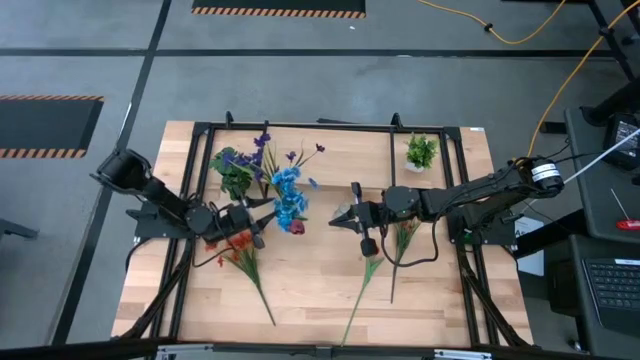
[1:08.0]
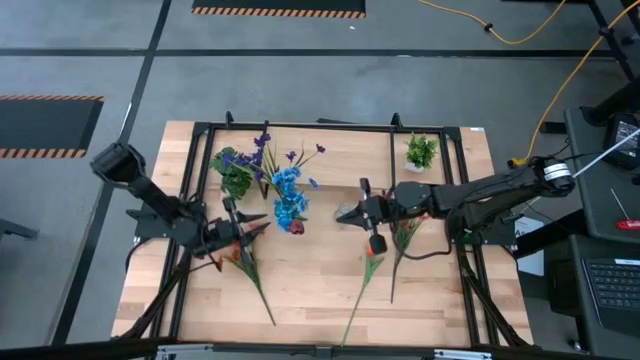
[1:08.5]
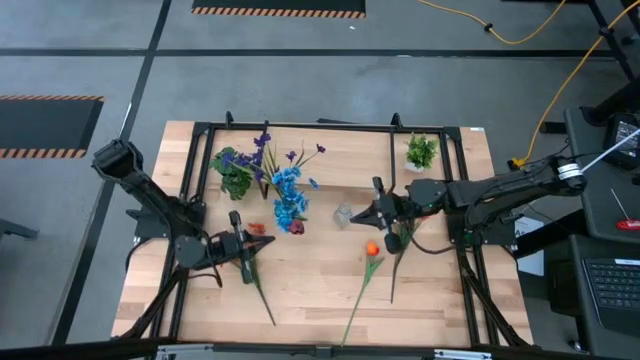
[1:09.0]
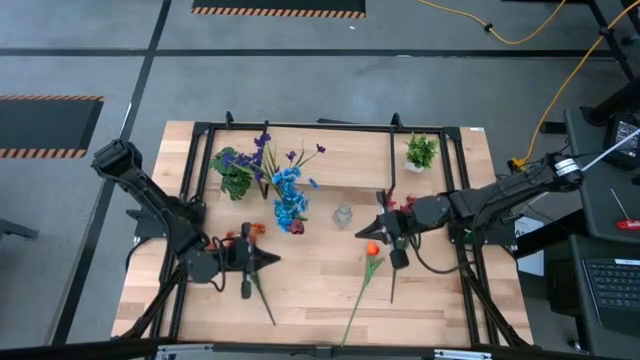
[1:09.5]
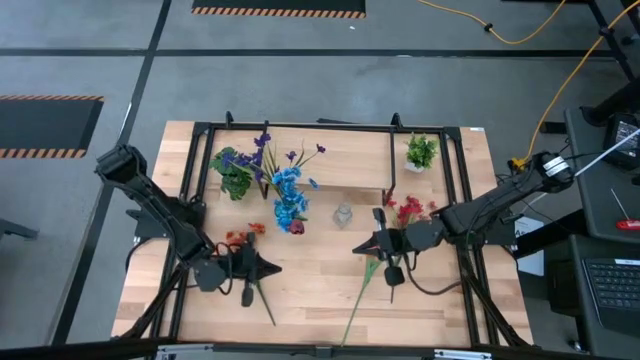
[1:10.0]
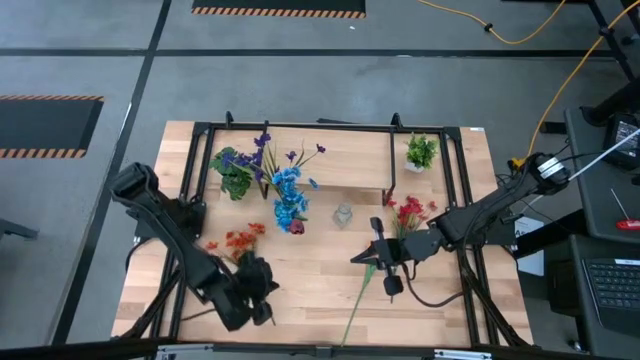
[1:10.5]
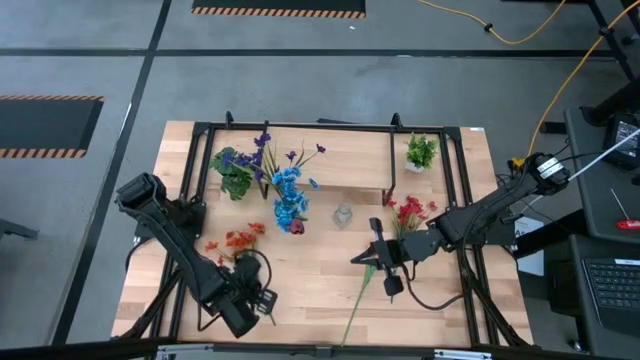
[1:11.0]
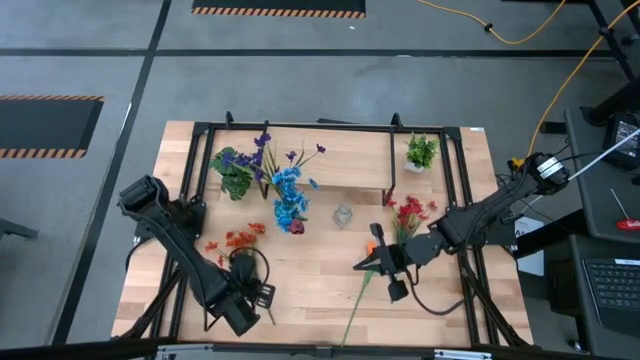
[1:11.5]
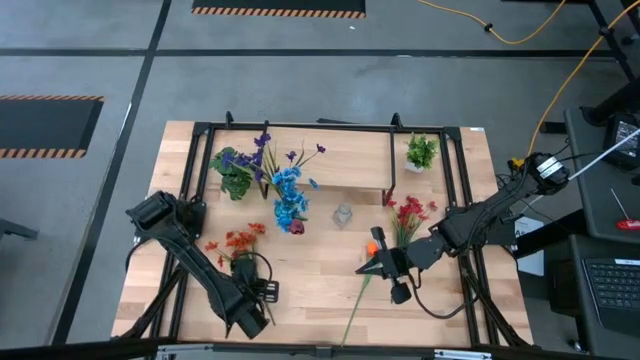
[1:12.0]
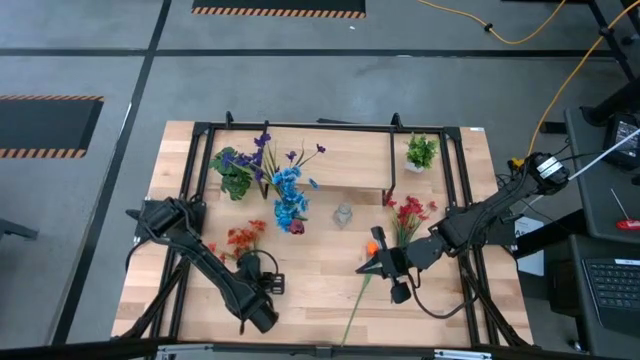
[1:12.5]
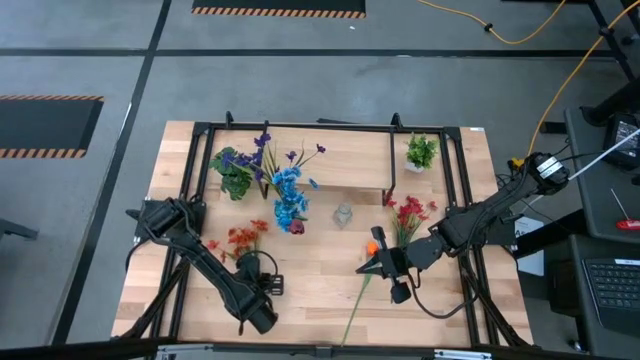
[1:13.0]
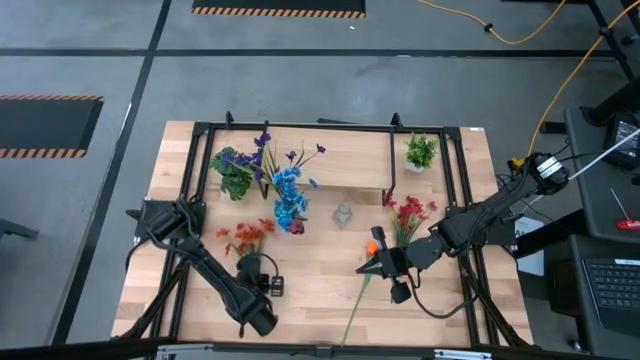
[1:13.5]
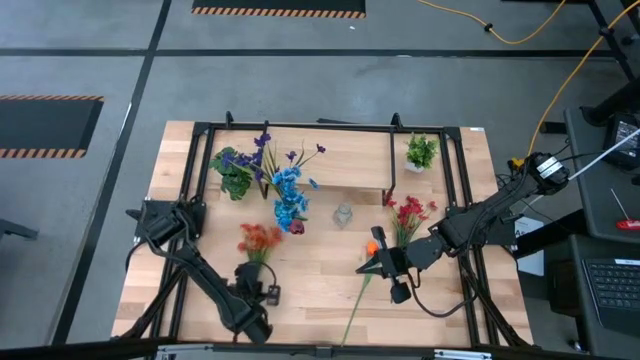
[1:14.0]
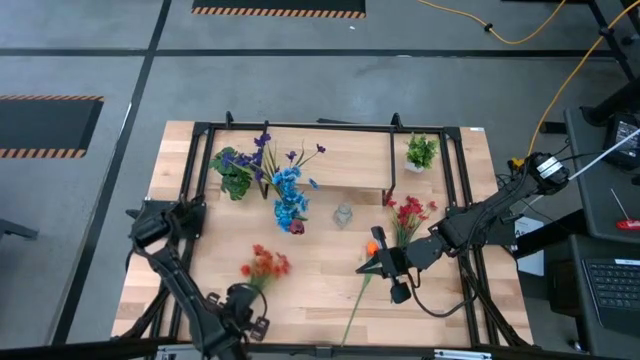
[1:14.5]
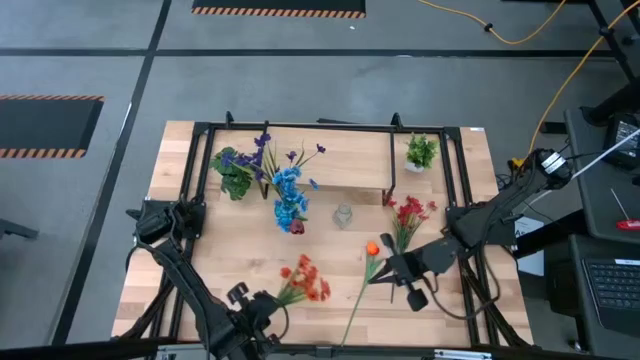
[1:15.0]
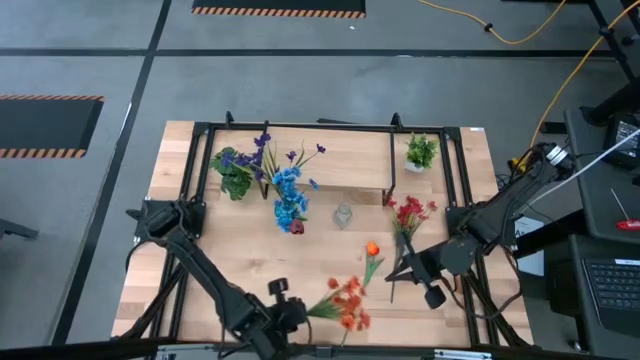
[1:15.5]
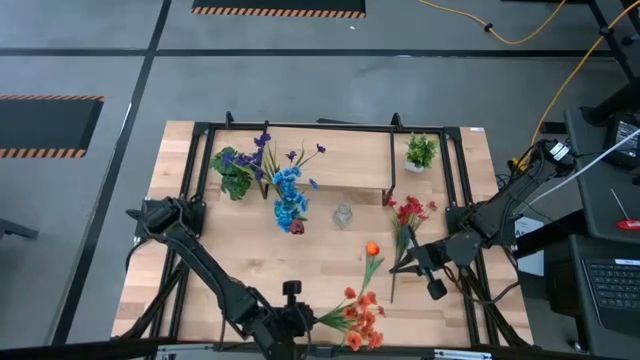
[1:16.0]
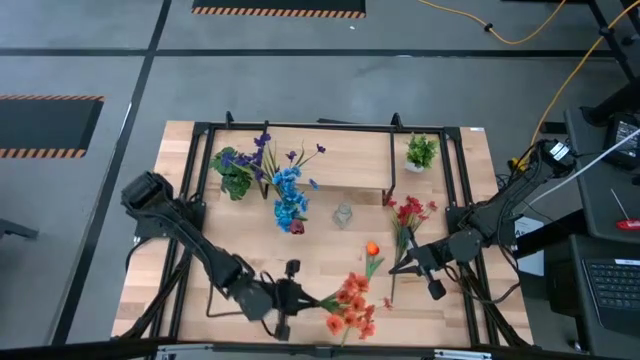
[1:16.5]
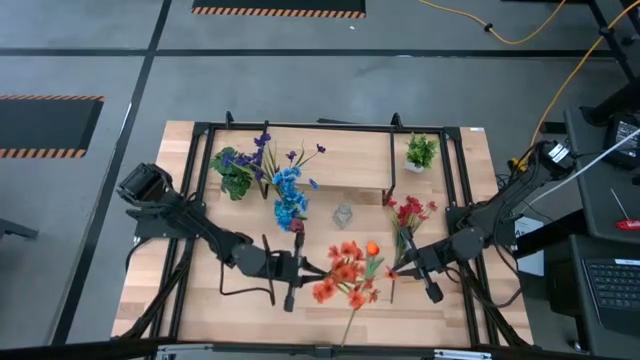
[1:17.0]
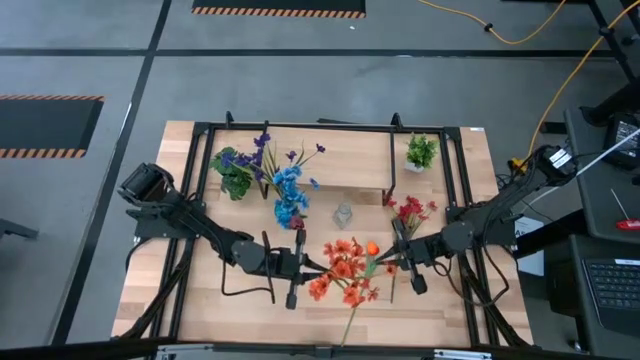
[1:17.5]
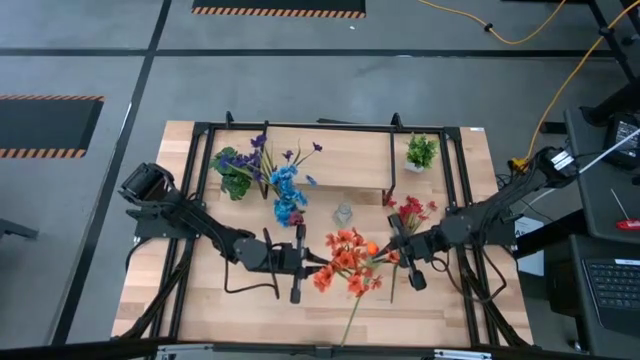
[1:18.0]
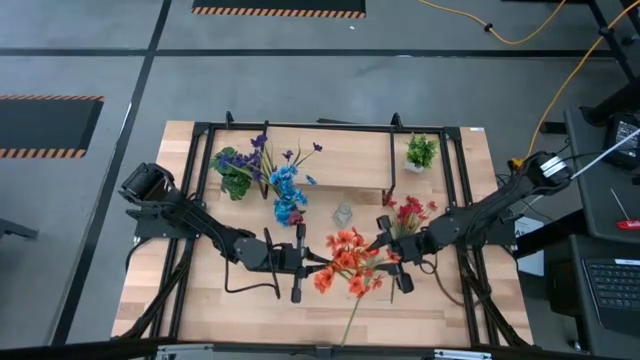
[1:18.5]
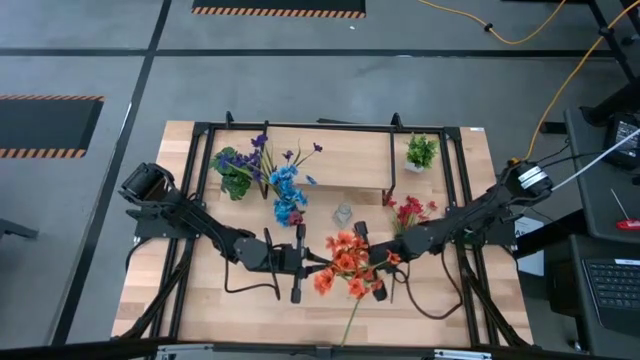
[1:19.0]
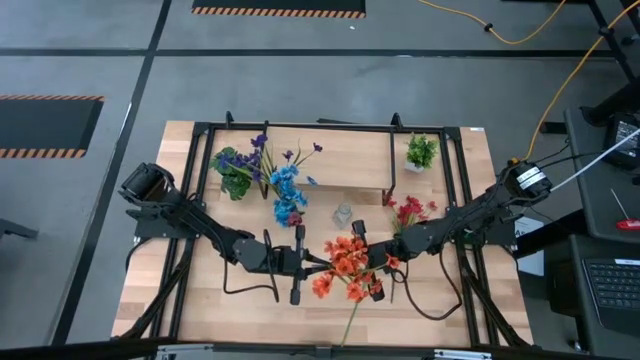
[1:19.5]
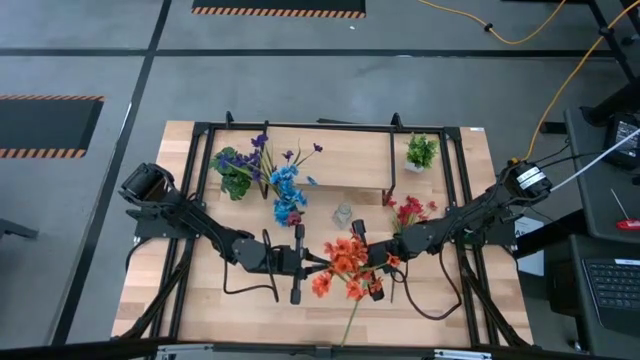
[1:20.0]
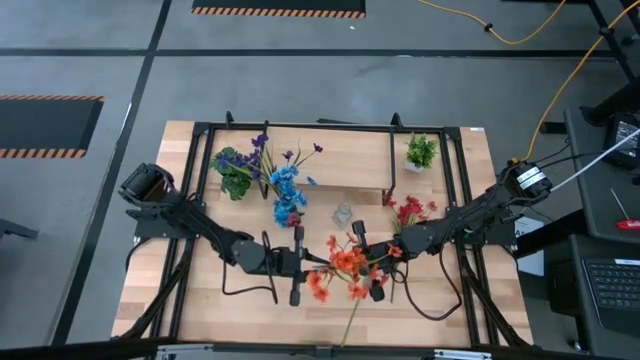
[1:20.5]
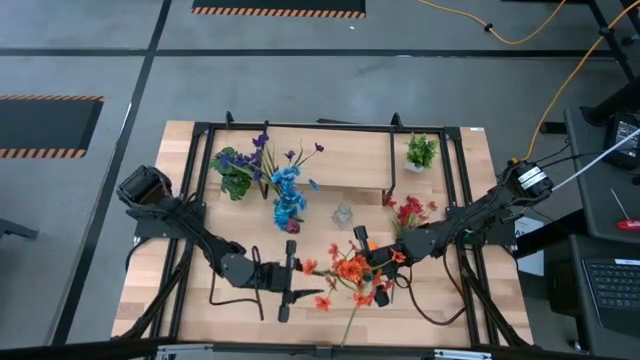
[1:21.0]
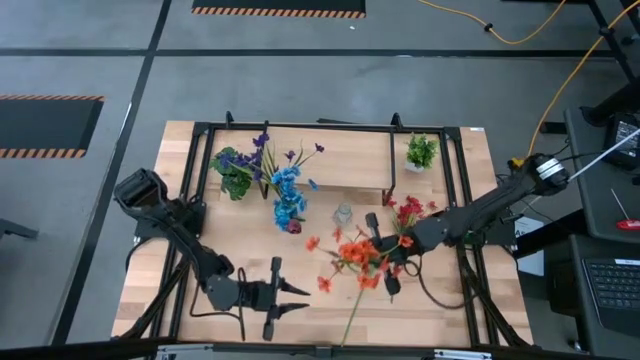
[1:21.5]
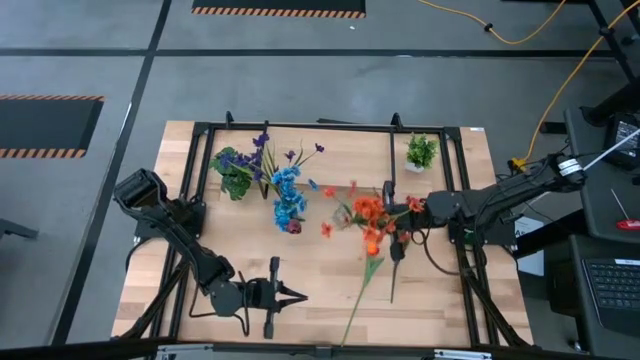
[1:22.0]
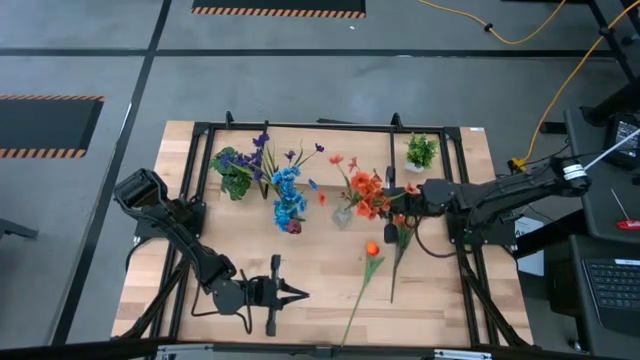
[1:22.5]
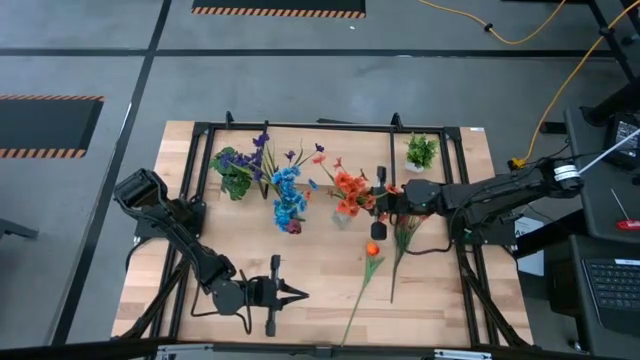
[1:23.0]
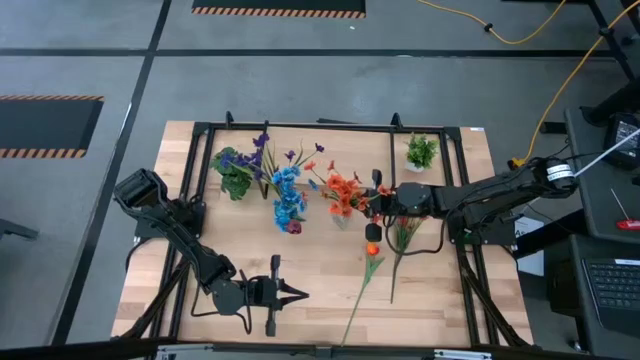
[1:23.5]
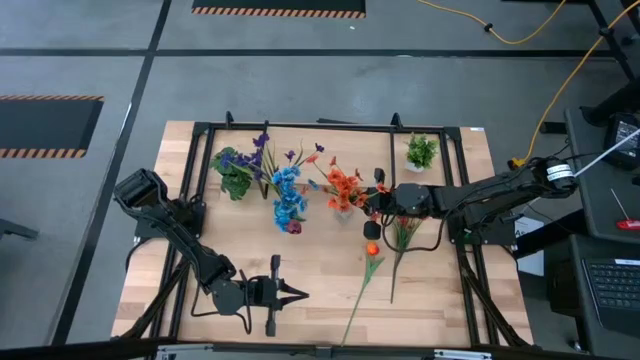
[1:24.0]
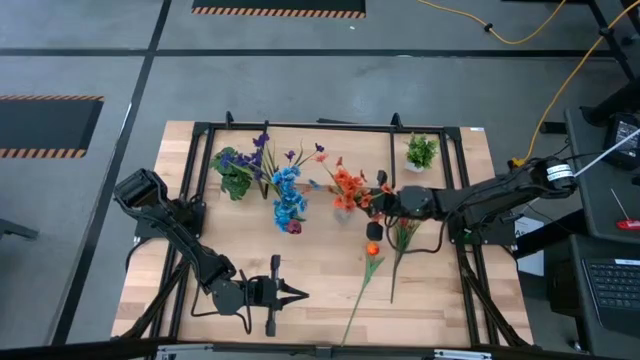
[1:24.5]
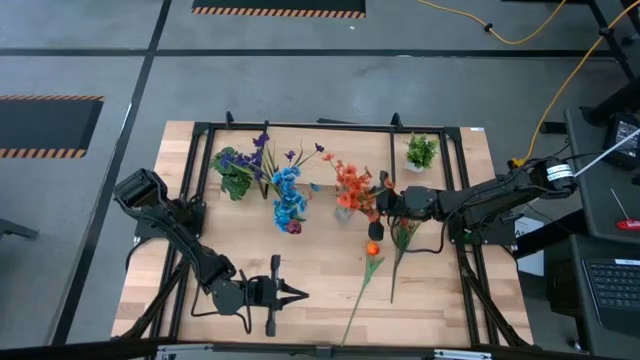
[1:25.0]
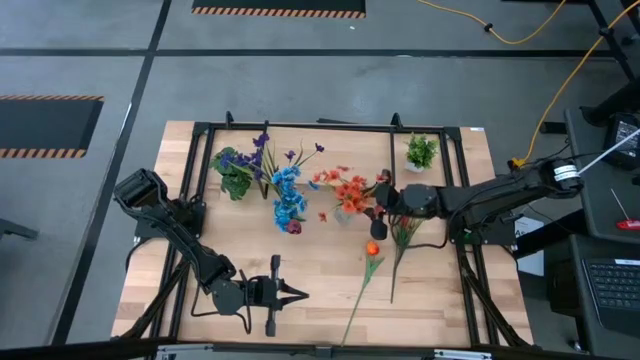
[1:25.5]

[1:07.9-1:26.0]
Task: Pick and place flowers into a vace then onto a shelf
Put the red orange flowers into the transparent vase

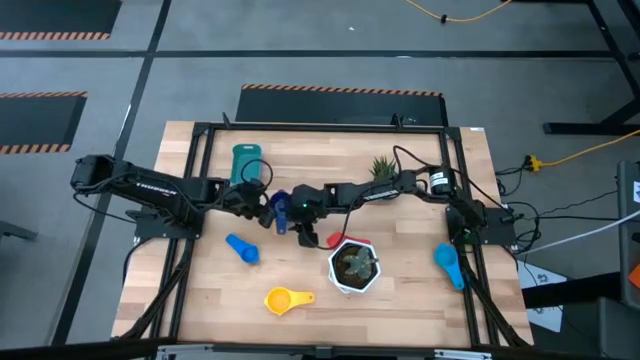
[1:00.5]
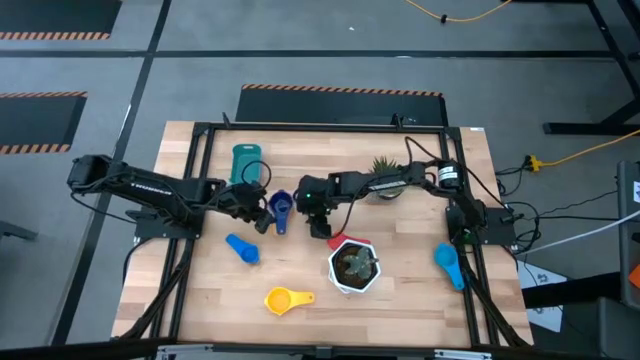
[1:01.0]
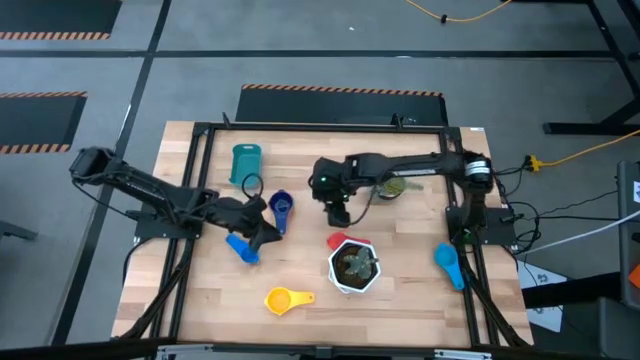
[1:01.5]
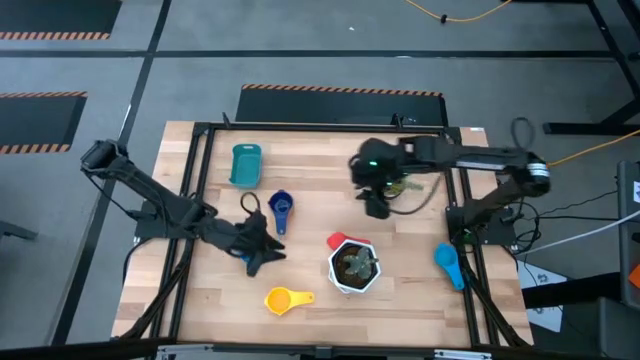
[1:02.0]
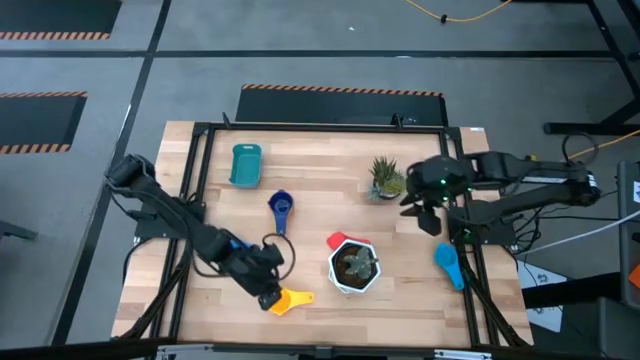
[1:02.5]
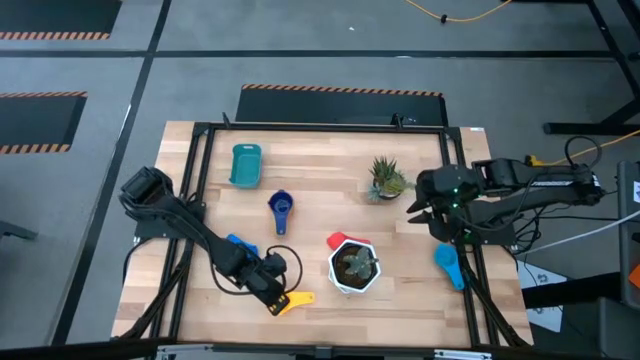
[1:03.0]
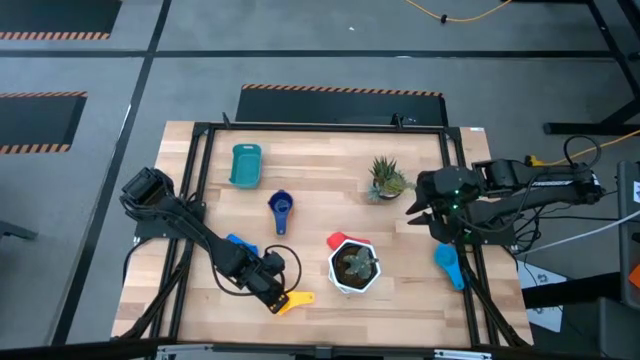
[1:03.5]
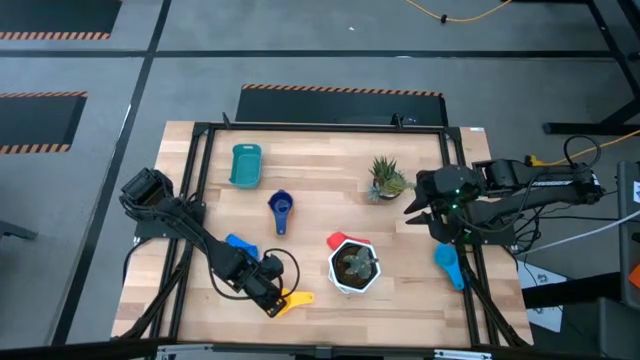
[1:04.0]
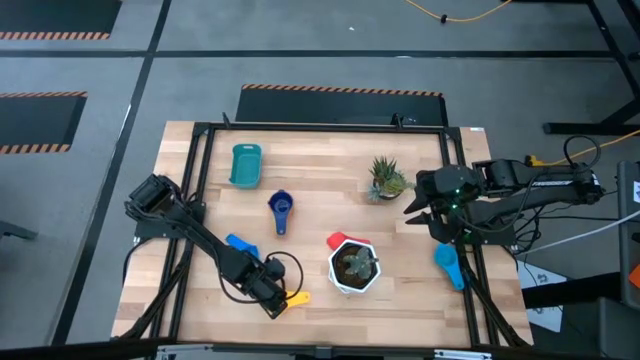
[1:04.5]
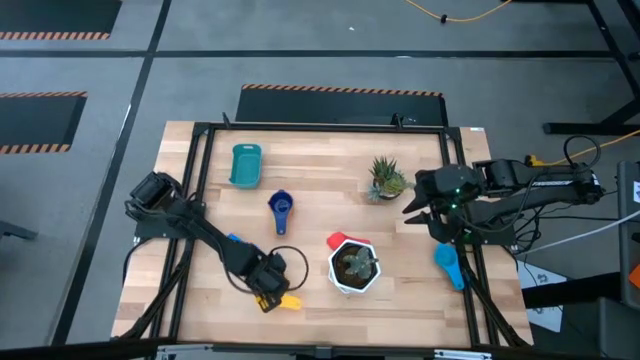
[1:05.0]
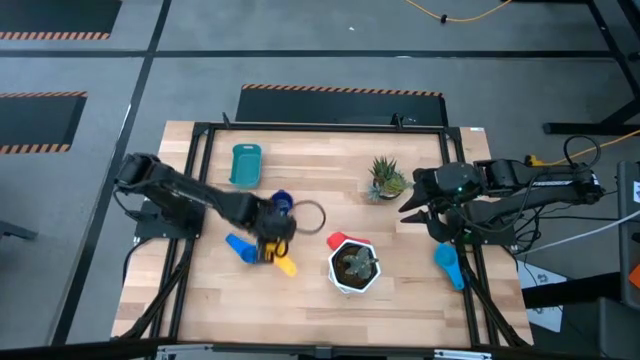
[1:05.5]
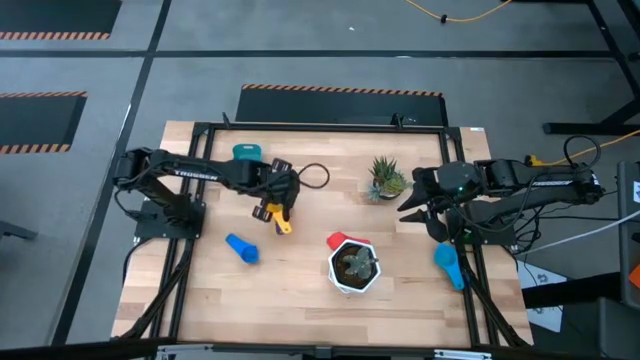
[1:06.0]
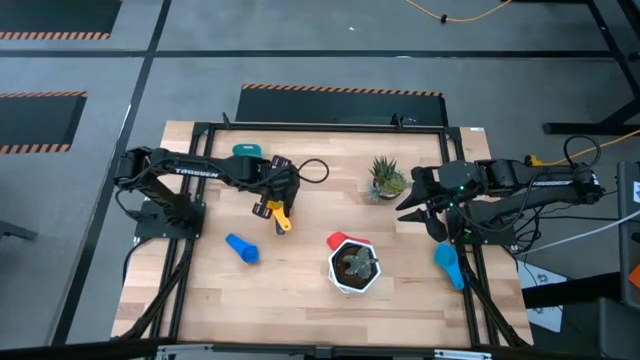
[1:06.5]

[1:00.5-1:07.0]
Task: Nest measuring cups in basket
Stack the yellow measuring cup into the dark blue measuring cup
